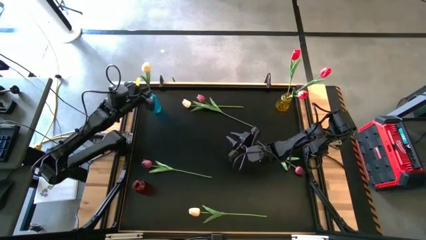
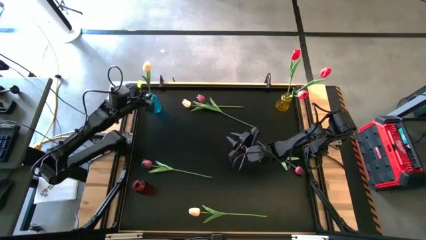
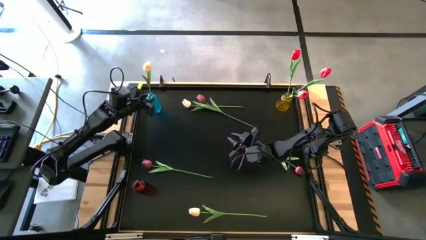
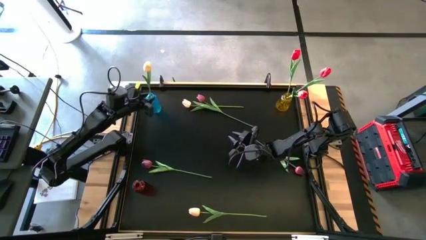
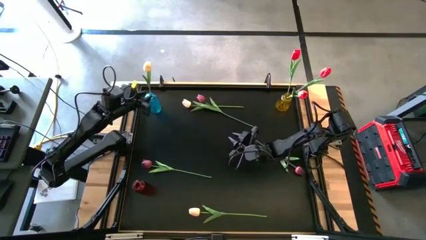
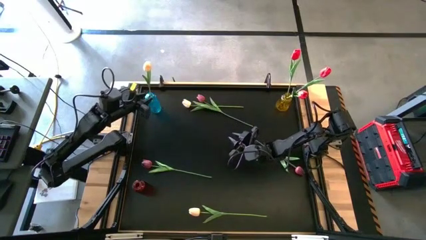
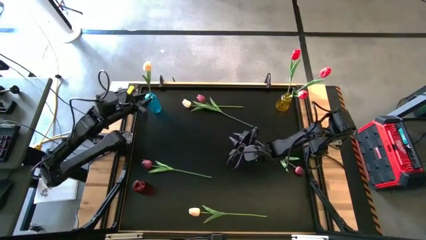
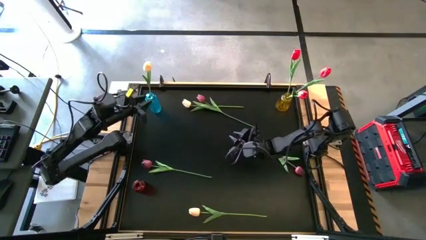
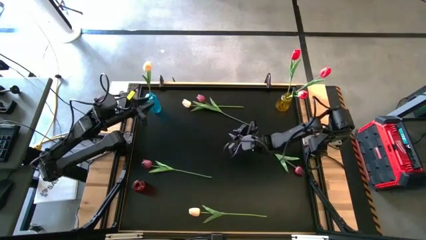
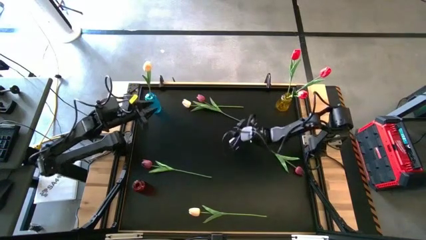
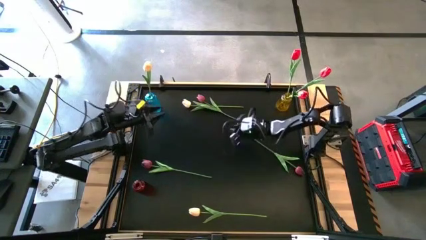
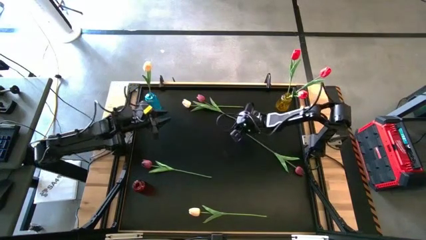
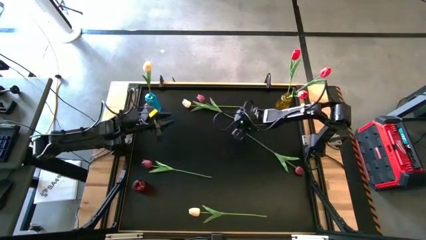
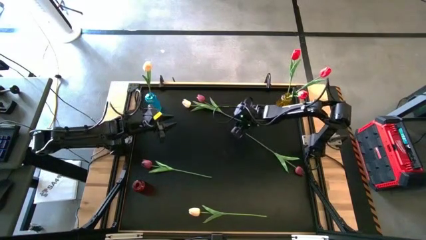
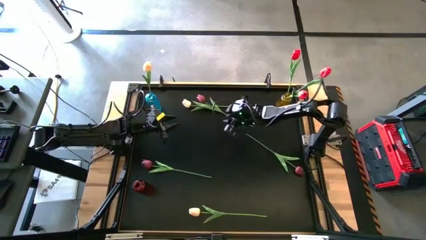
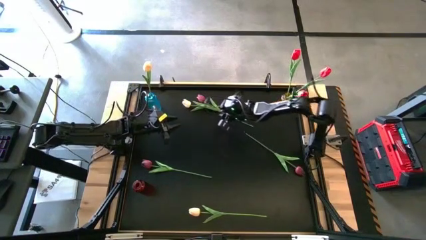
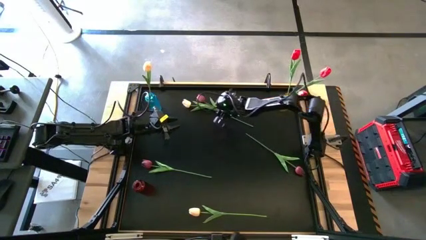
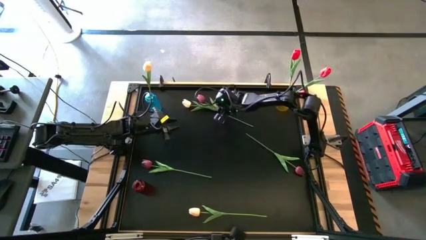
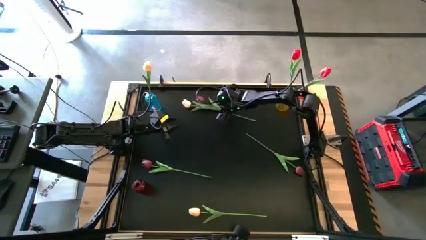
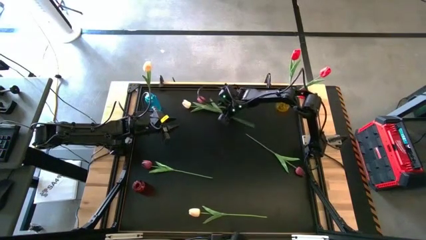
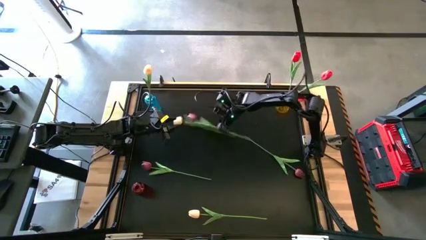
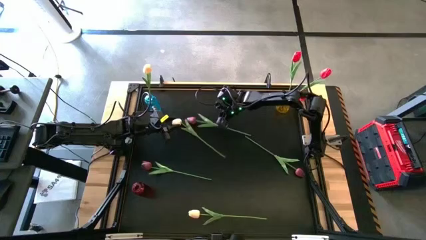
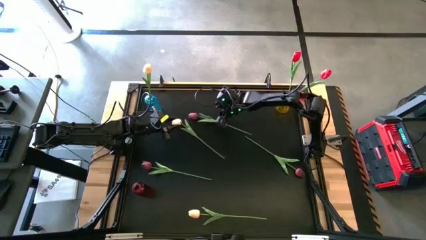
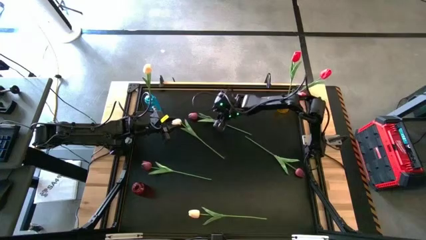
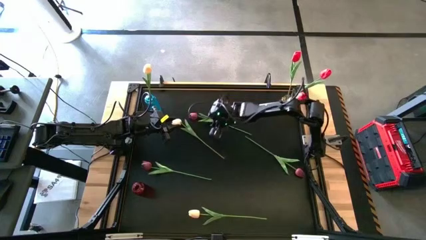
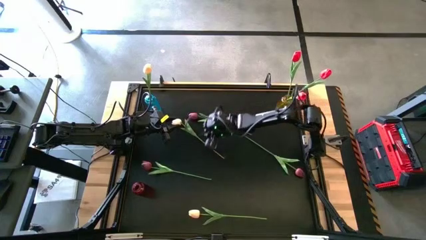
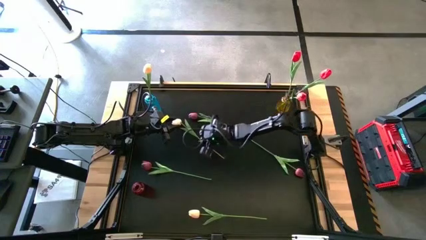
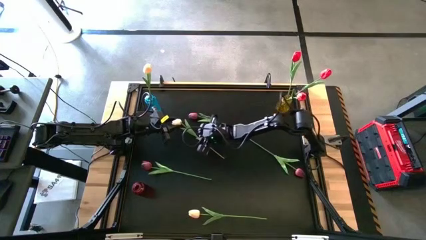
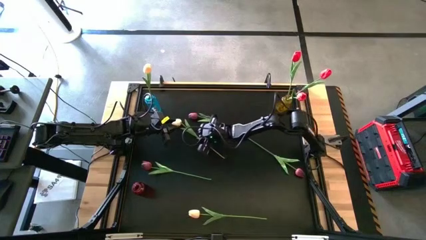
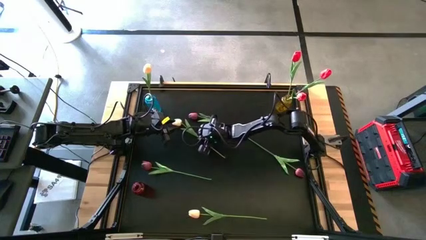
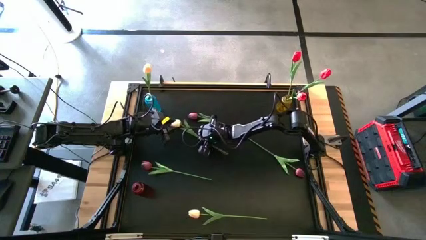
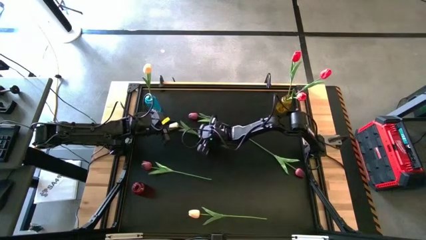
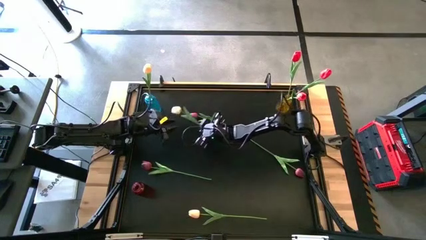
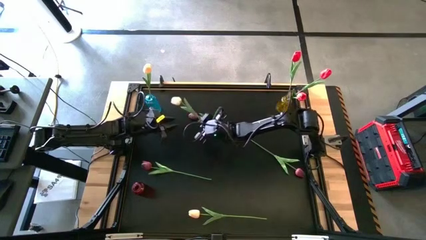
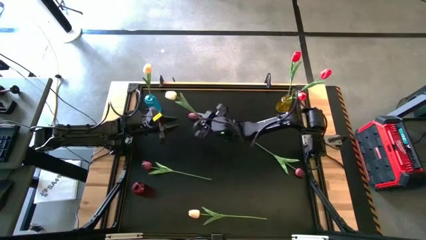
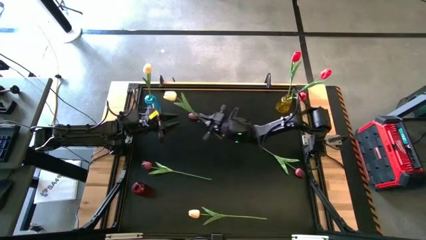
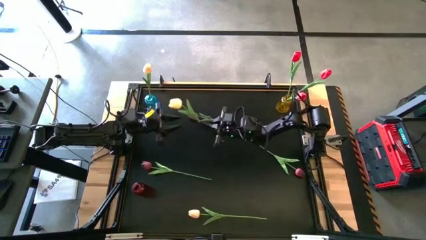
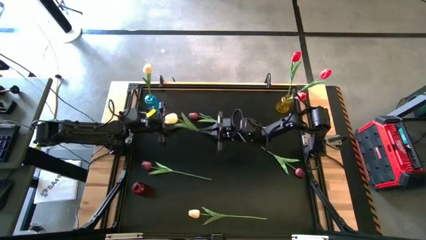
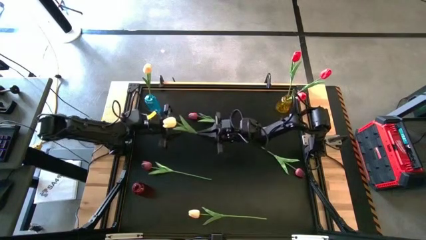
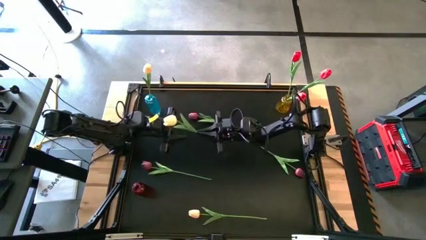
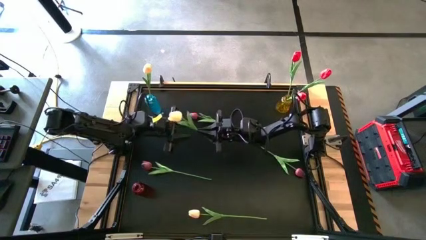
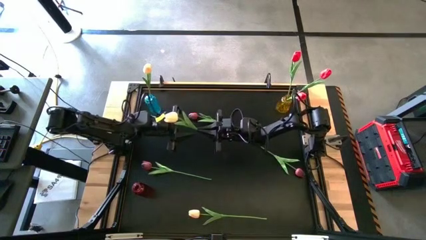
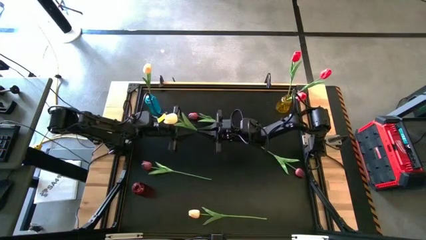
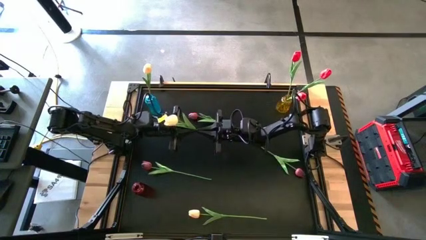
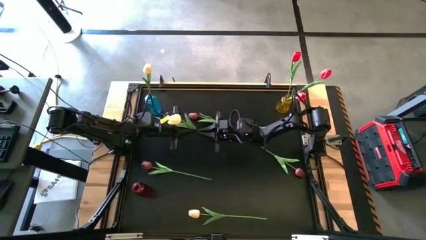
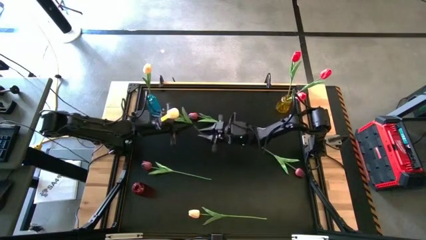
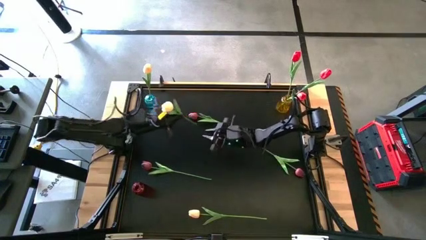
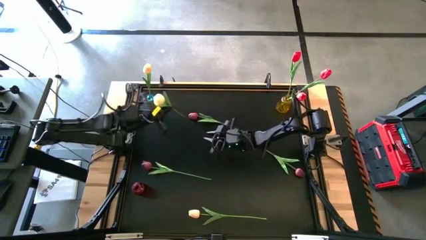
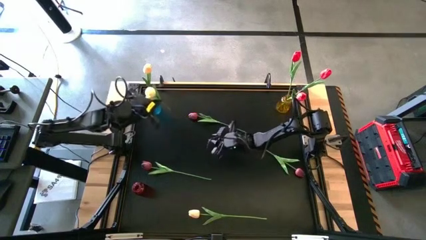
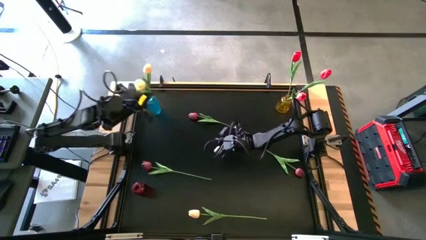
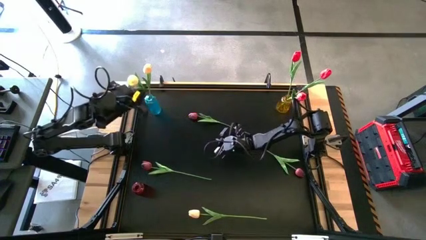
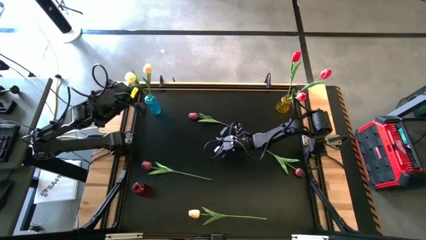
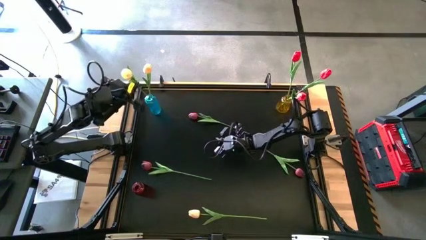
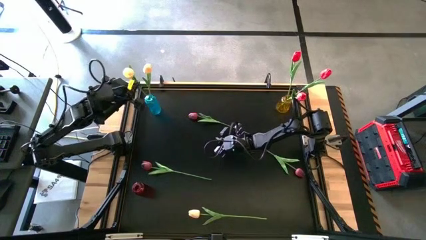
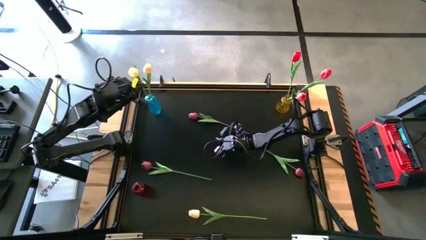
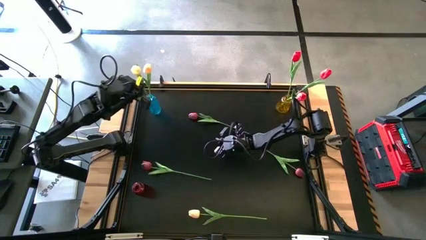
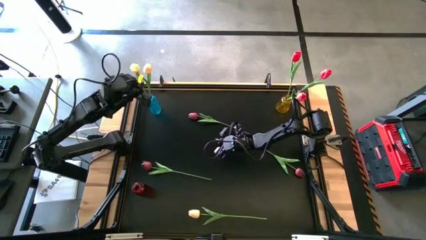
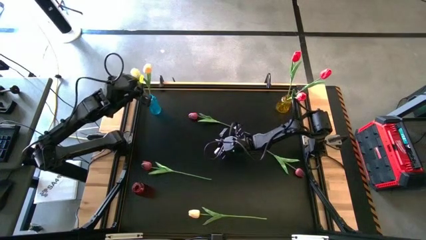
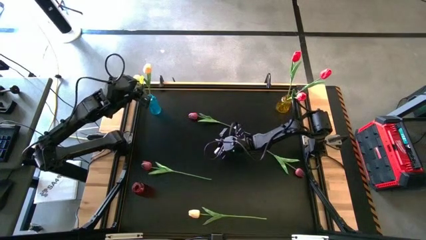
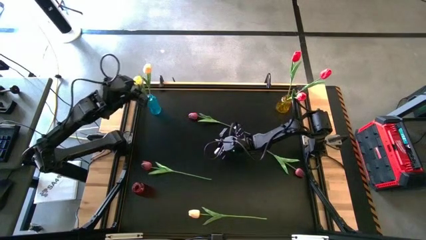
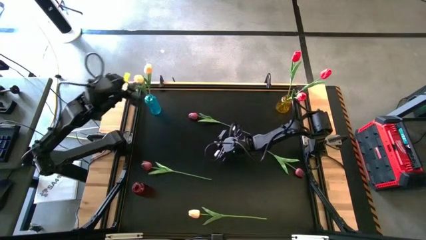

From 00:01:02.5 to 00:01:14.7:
Task: Sort flowers into vase by color
Put the top white tulip into the blue vase
